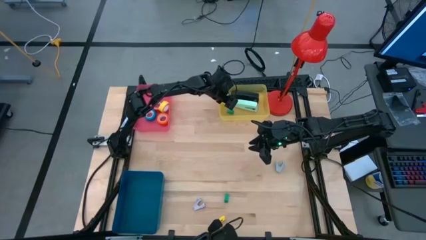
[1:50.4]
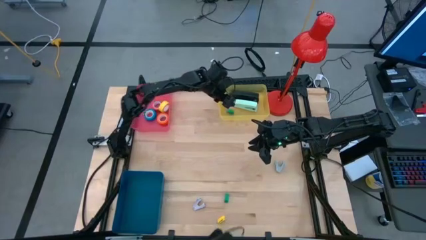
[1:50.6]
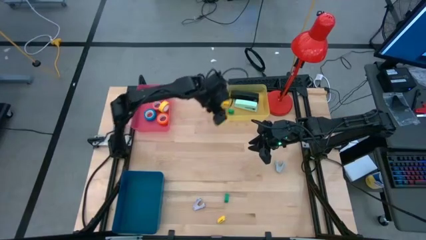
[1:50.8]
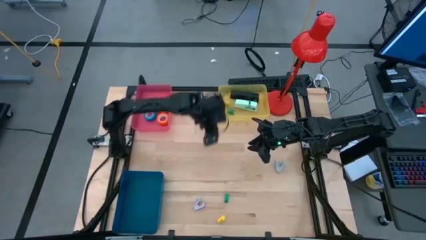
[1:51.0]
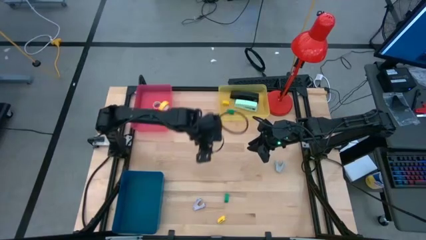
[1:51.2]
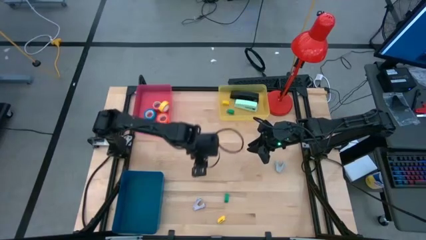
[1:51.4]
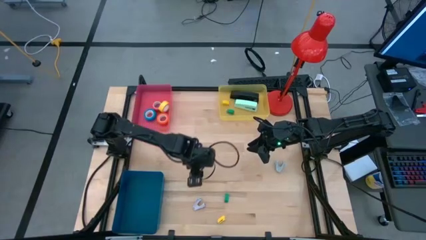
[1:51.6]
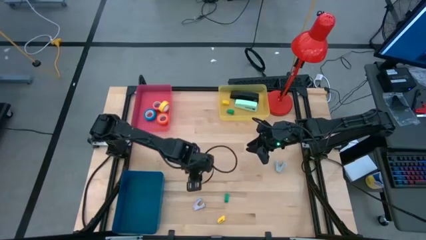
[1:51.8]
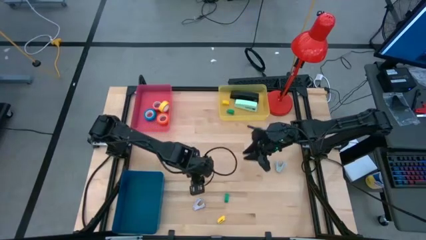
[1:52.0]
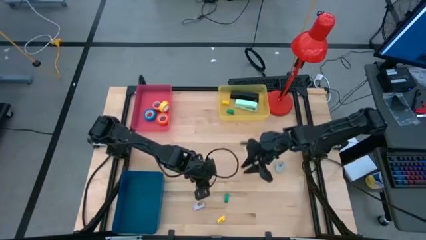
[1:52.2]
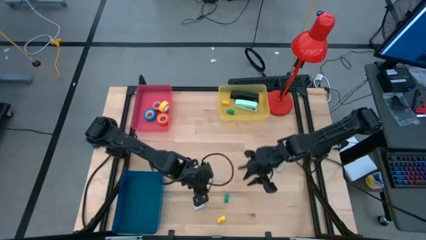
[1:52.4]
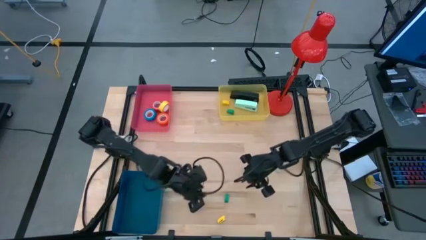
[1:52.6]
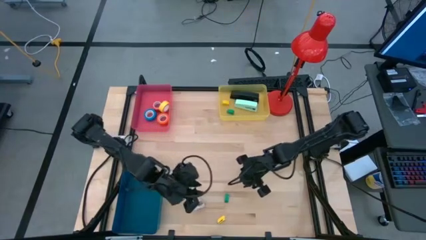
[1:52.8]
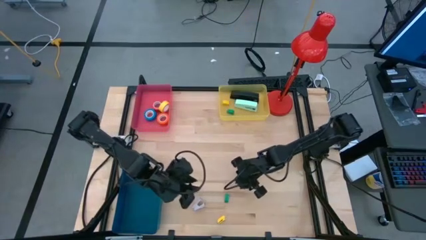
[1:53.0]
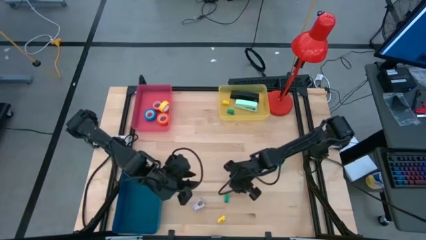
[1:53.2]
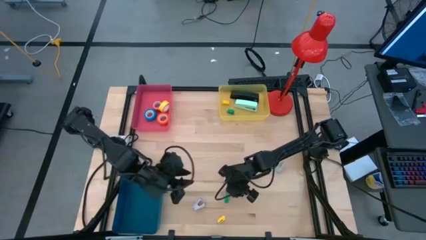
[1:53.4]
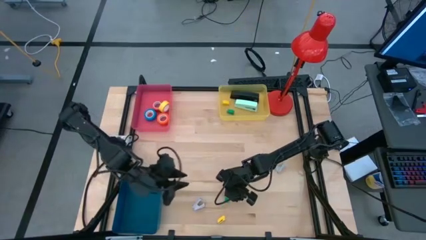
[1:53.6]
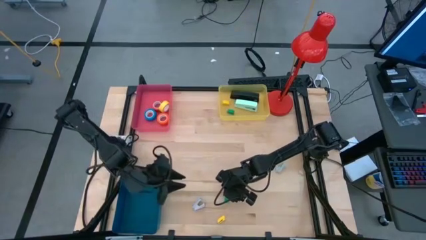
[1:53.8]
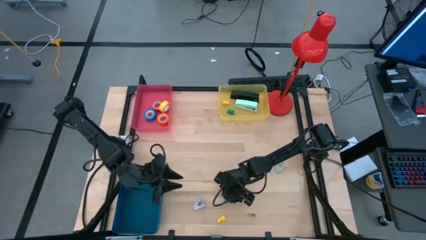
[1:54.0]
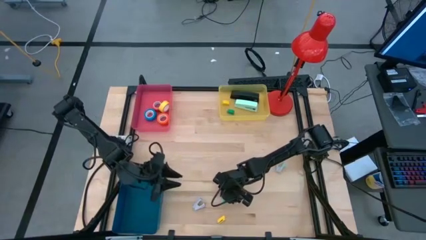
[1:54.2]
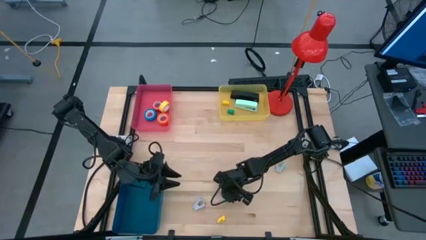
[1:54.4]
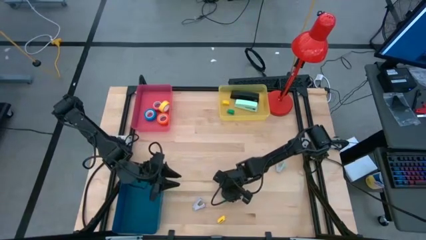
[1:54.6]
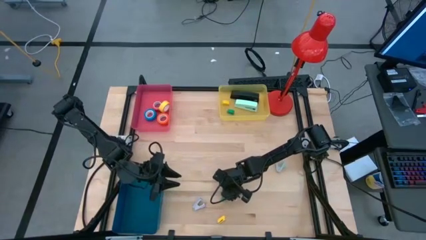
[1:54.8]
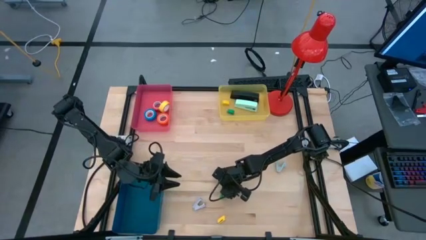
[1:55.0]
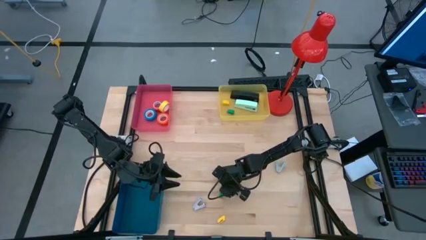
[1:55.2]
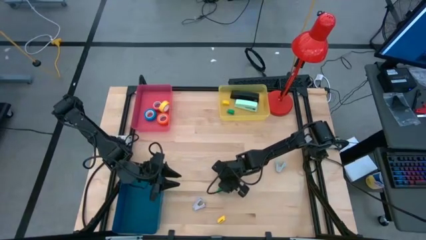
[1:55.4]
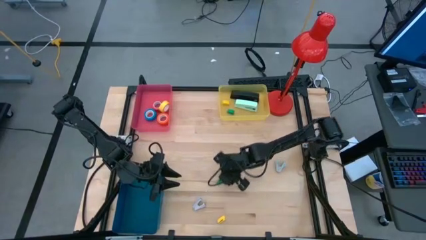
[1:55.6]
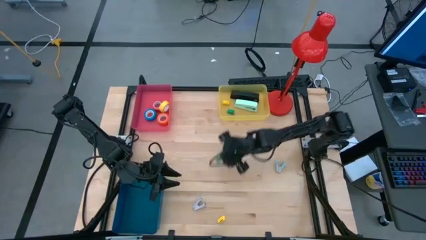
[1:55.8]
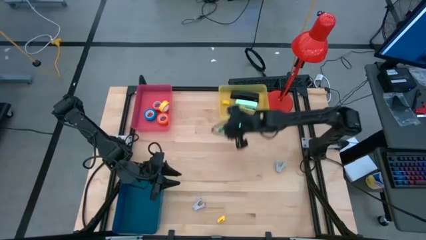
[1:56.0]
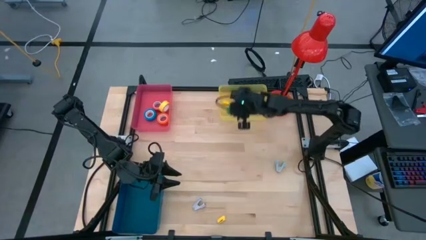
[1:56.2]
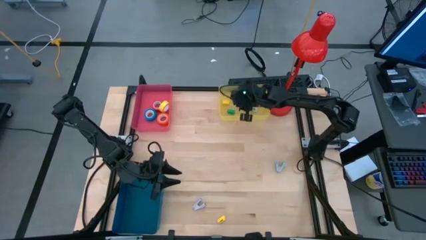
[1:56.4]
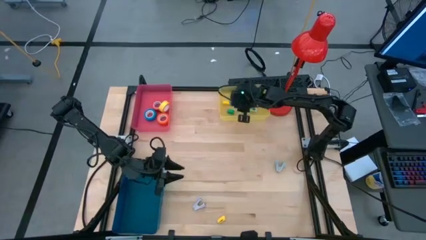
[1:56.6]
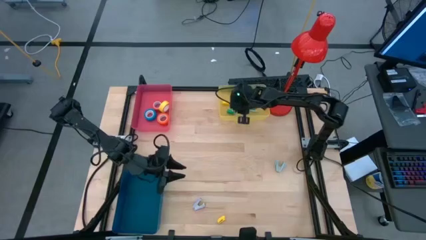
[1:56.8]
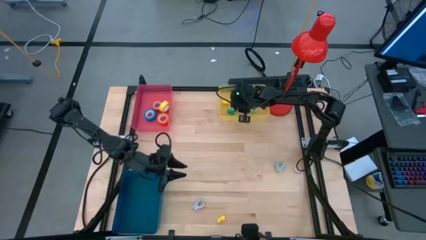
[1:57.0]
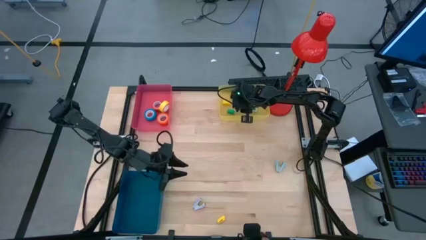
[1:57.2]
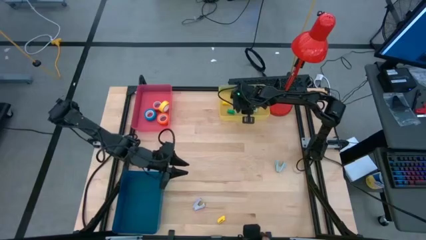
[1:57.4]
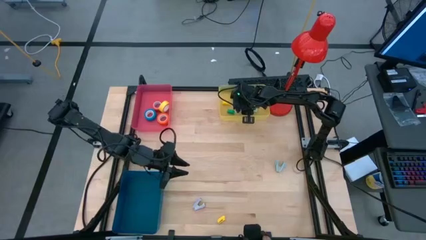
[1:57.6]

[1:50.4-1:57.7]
Task: Pick and place Stapler, Stapler remover, tape
Put the small green stapler into the yellow bin

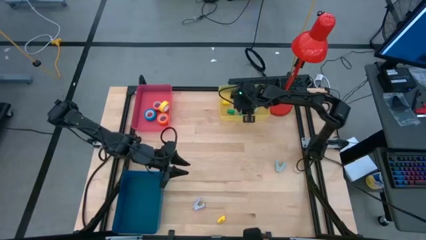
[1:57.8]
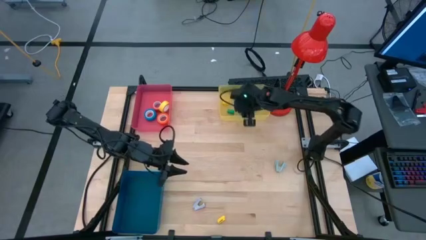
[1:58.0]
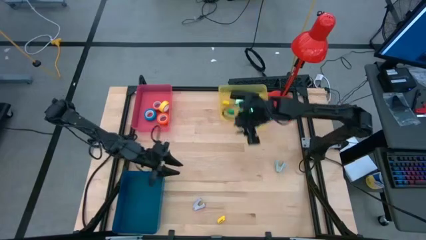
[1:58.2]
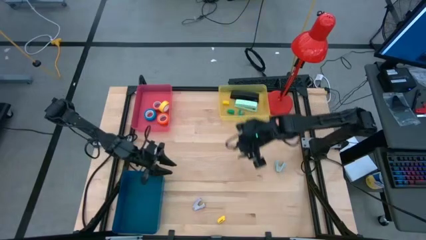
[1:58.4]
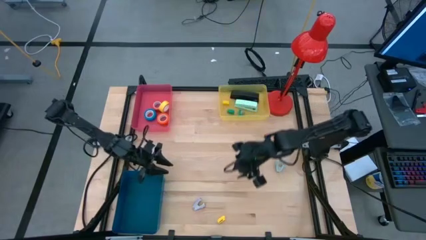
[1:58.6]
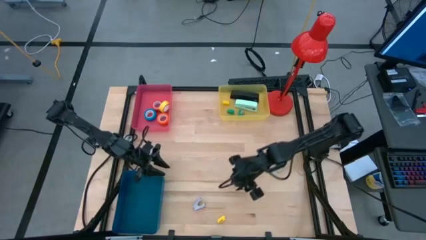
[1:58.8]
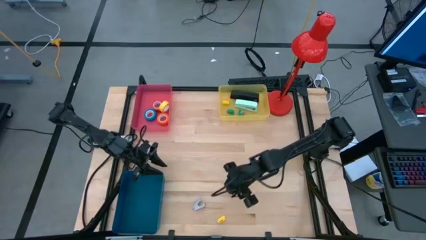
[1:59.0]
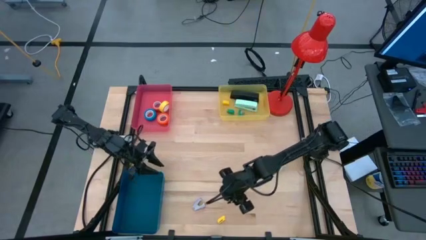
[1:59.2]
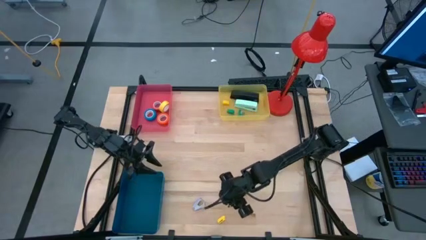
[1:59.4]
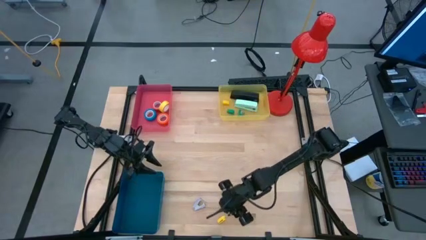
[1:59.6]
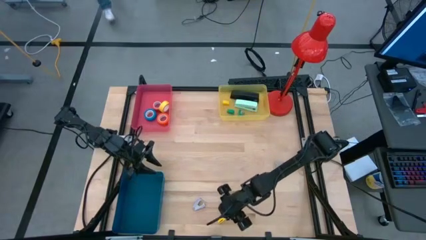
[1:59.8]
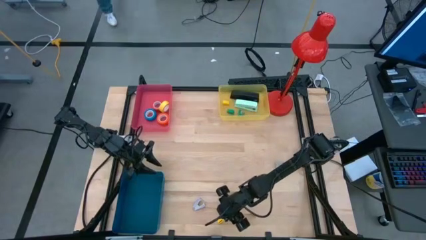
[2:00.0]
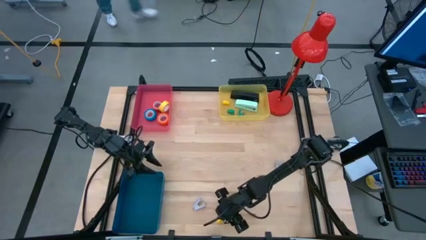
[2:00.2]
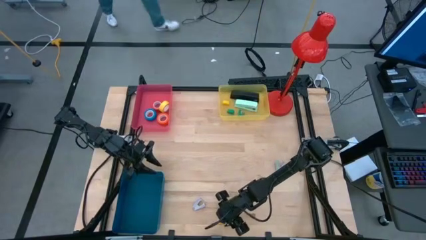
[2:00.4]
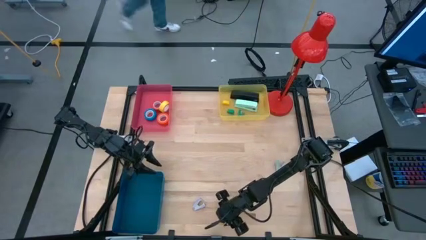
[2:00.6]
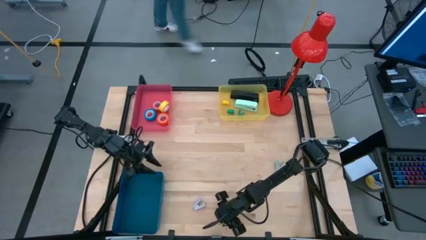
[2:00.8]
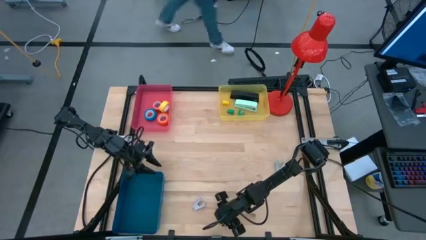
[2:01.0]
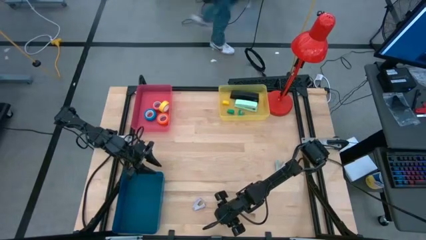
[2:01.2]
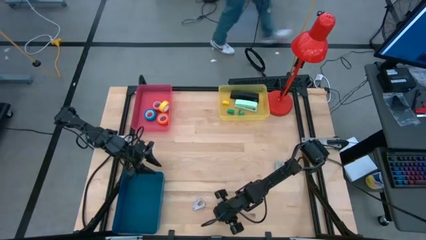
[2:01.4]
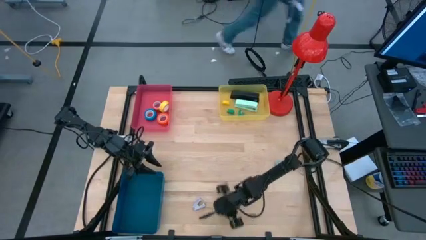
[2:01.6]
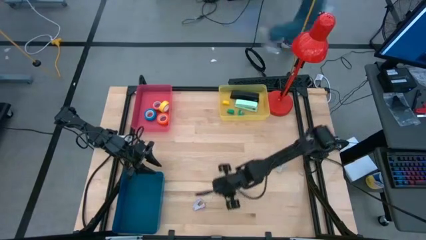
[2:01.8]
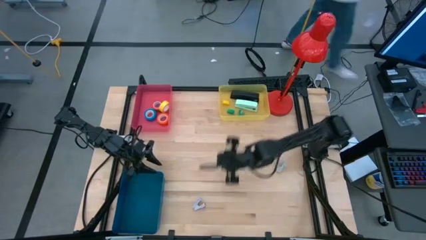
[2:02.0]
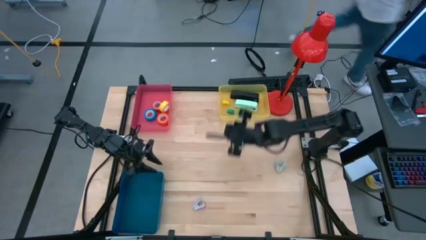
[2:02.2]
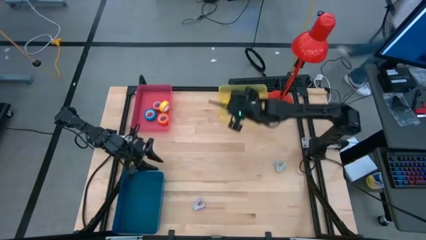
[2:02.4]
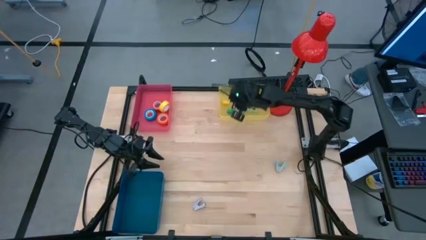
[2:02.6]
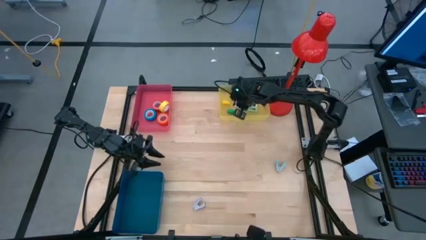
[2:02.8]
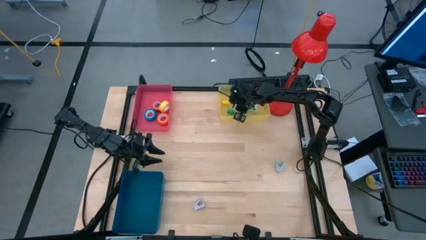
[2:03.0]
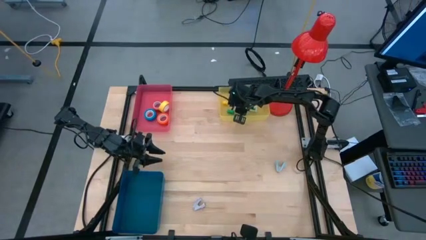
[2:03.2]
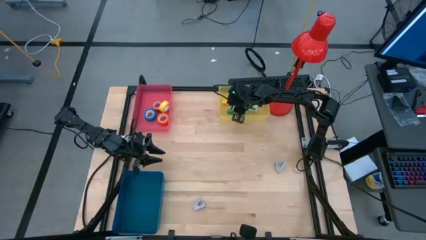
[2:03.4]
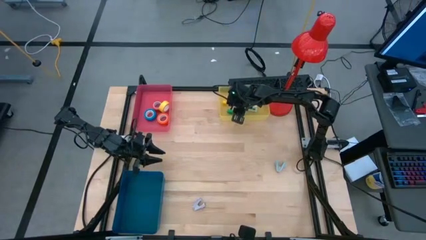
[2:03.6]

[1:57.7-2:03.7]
Put the small yellow stapler into the yellow bin

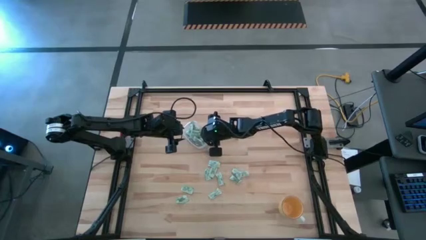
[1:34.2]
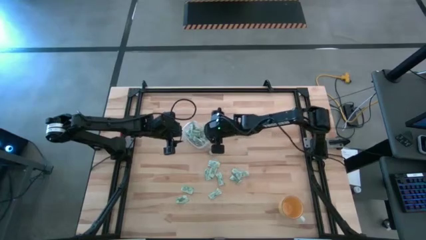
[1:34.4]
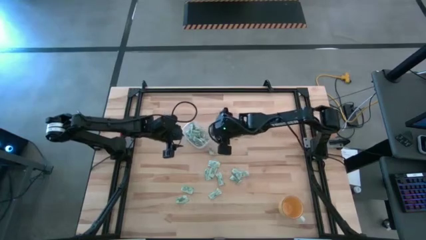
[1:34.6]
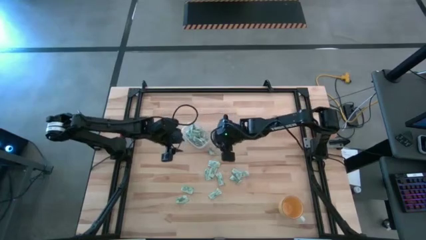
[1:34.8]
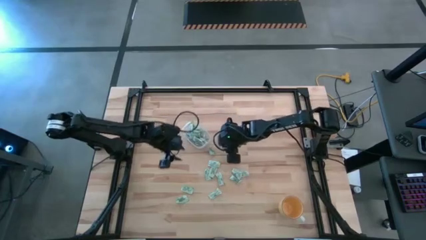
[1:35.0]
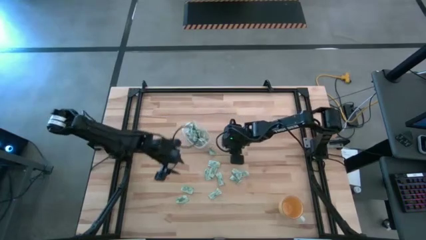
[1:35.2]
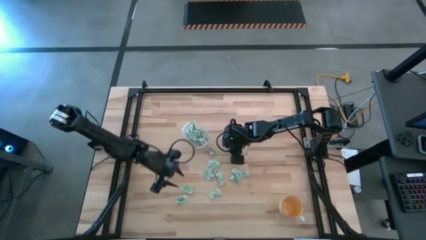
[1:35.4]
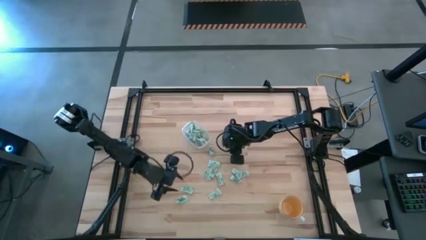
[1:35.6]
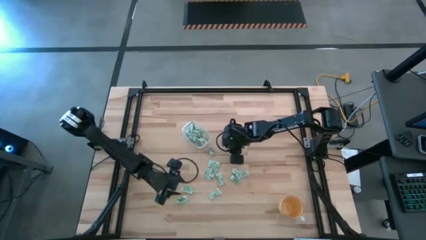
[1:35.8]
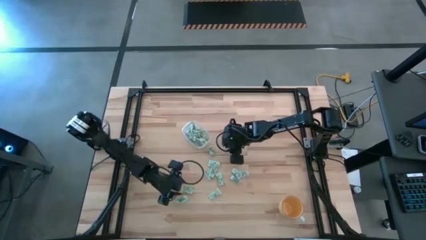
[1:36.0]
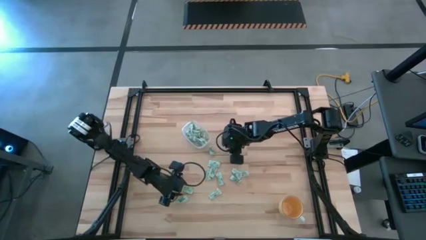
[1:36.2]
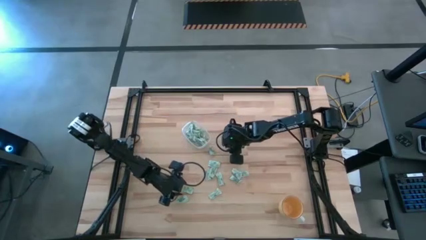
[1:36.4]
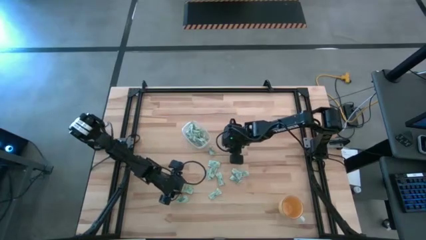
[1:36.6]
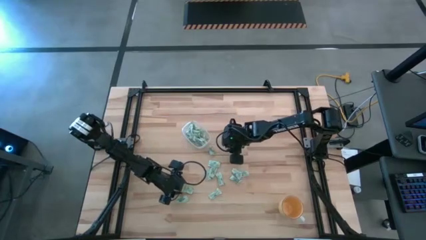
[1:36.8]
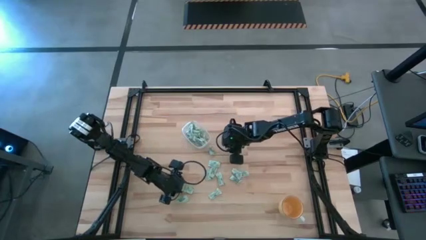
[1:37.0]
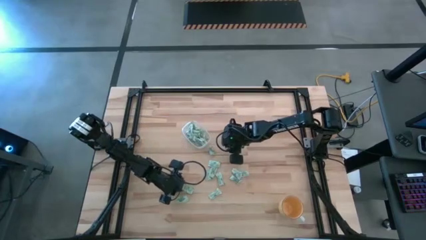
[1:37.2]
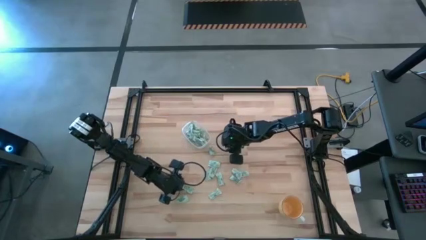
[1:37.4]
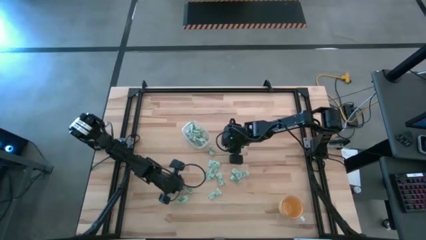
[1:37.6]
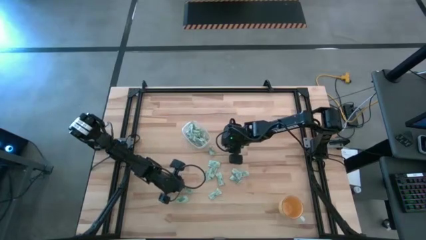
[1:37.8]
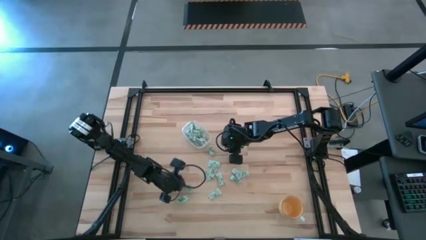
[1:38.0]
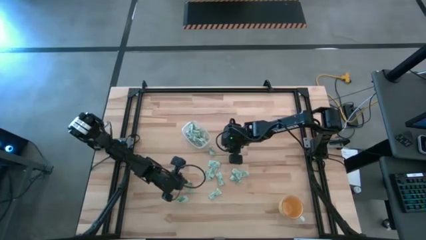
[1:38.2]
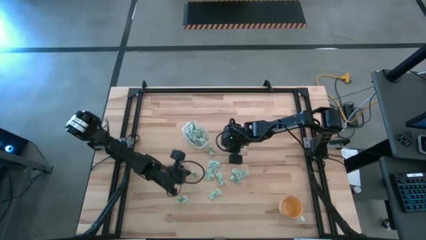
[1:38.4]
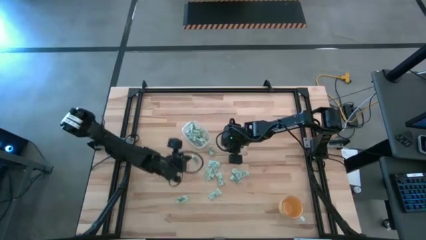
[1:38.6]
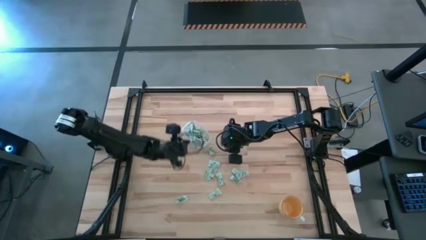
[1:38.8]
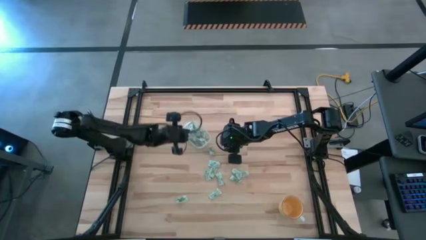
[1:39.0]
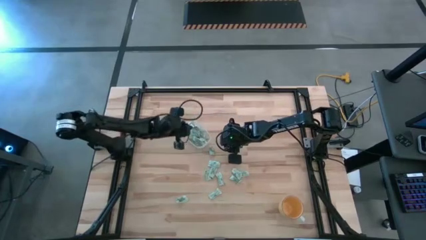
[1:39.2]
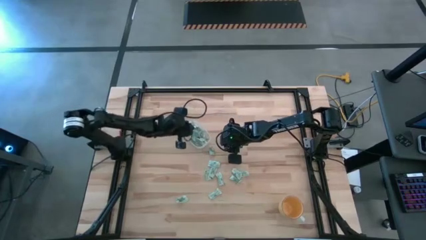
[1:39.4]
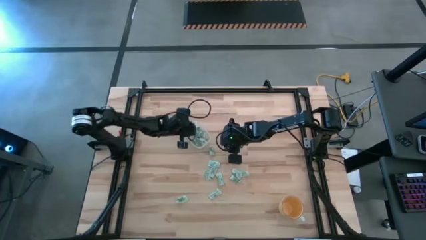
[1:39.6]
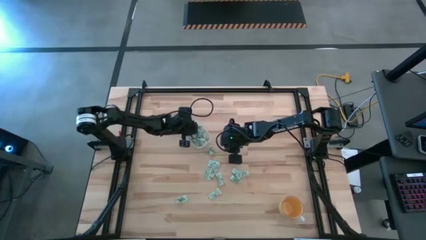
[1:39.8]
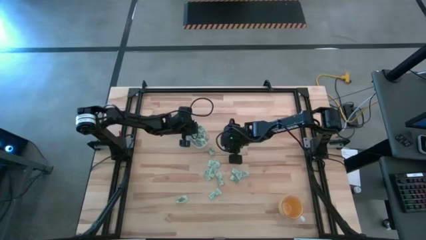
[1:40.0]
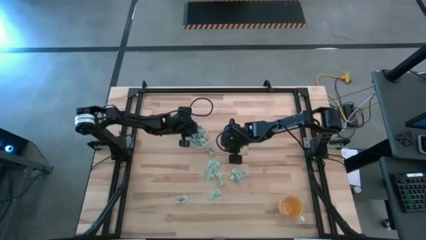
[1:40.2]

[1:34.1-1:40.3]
Task: Pick and place Stevia / Truvia into bins
Put the stevia packet into the transparent bin
